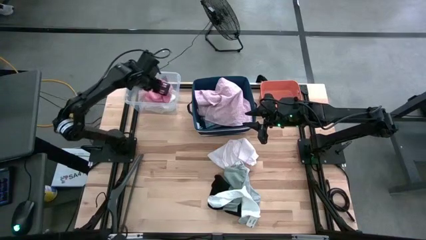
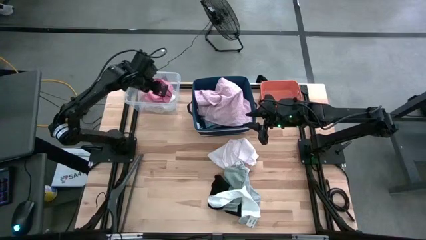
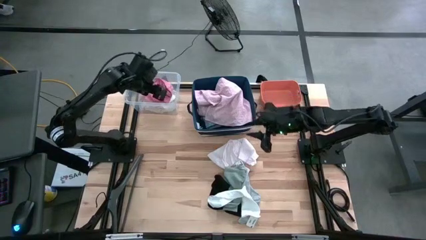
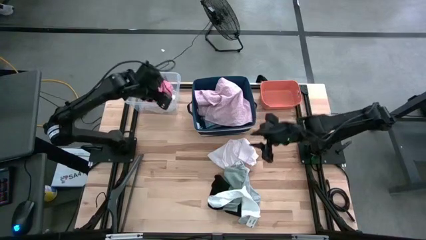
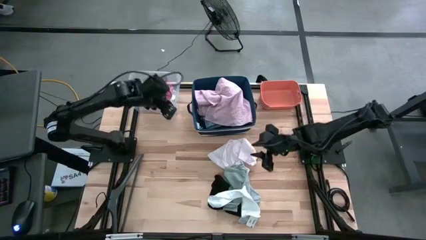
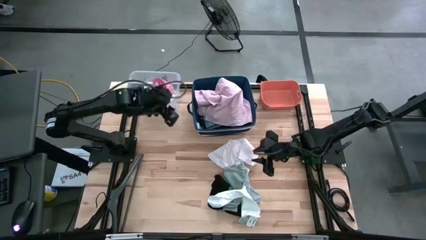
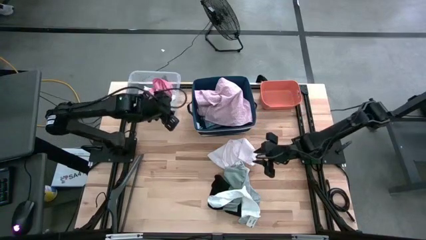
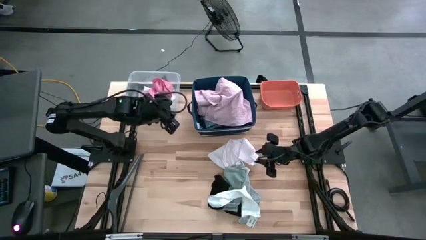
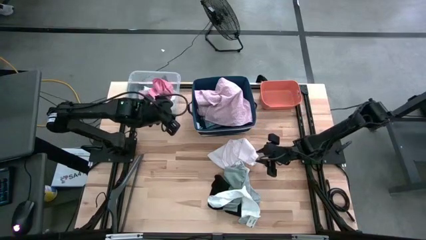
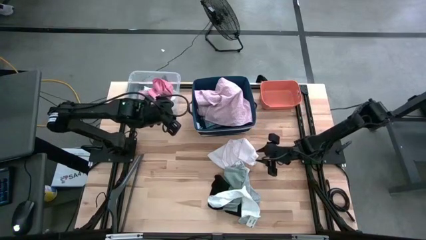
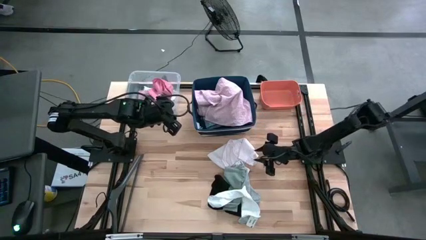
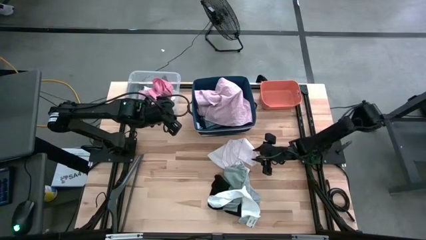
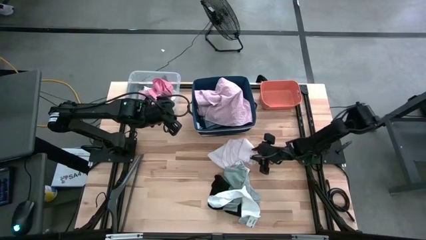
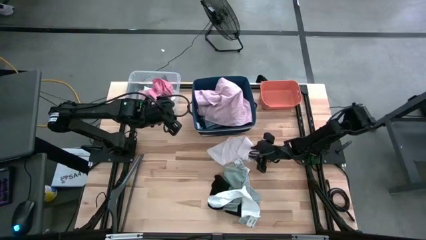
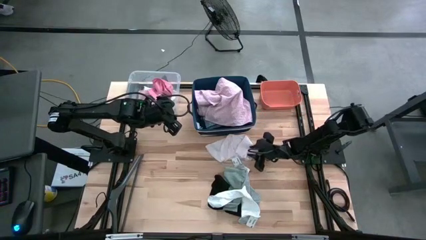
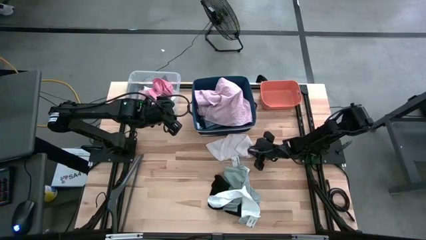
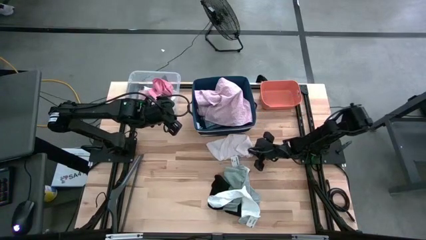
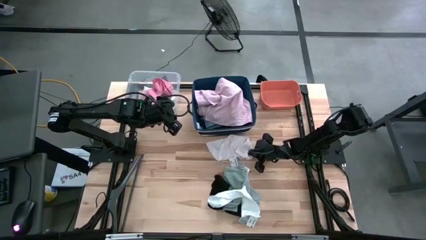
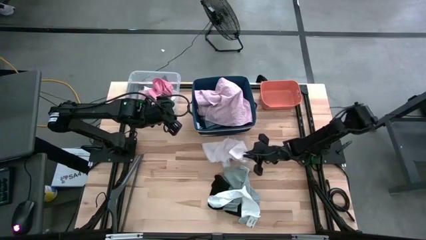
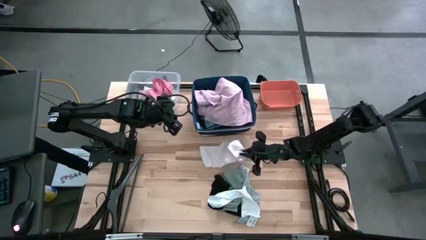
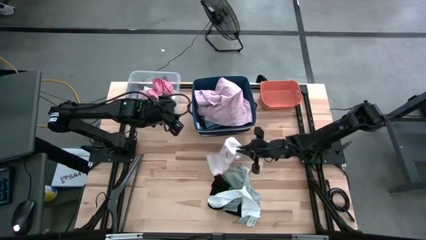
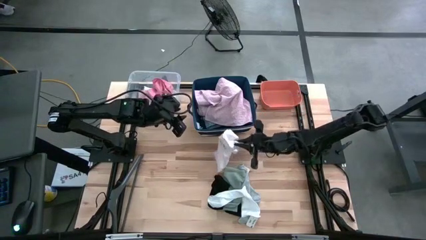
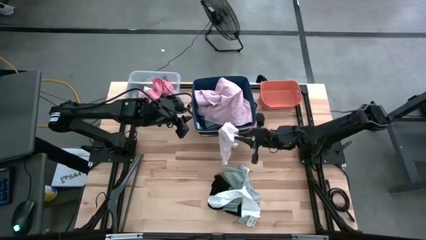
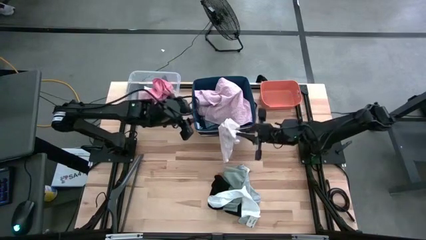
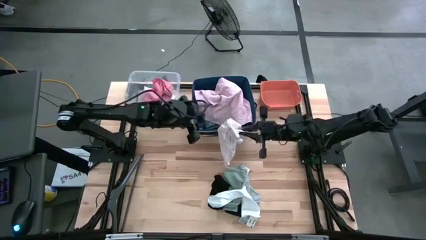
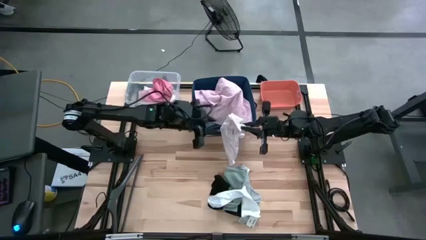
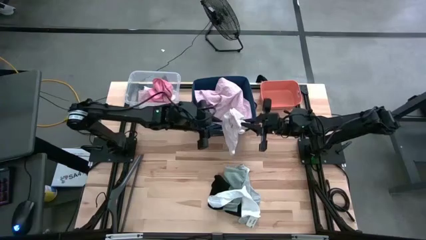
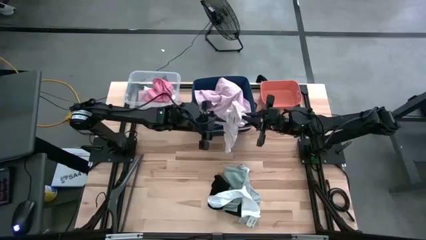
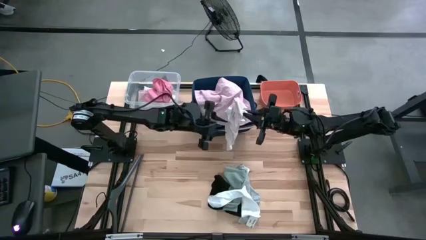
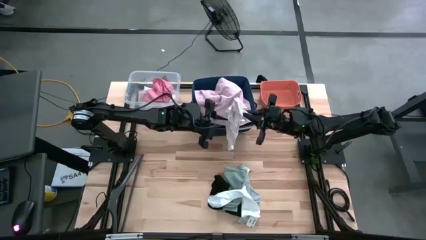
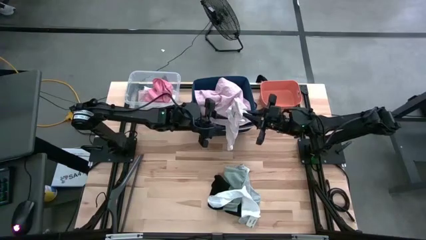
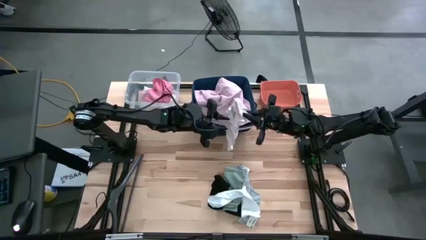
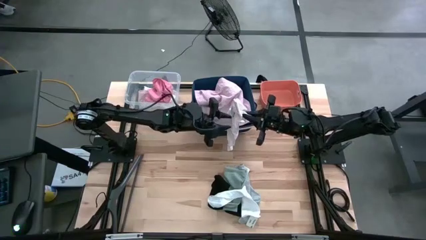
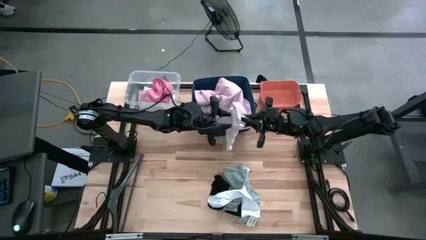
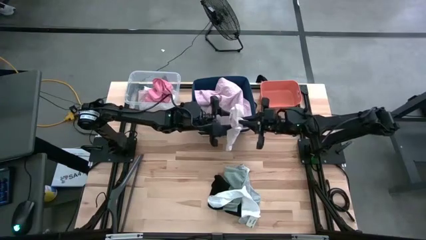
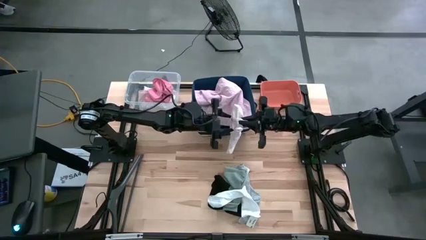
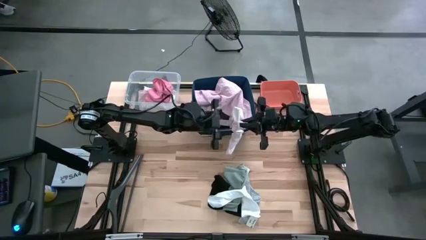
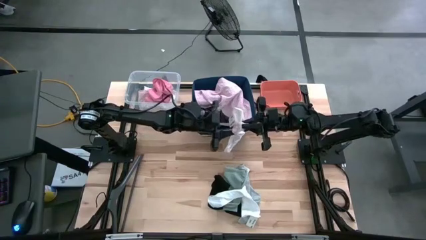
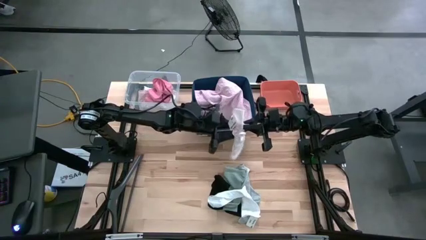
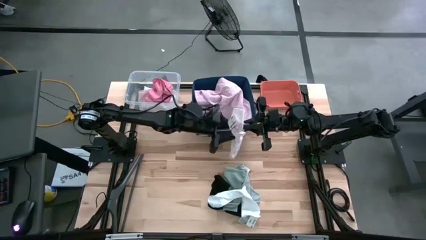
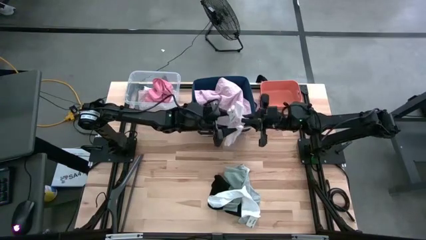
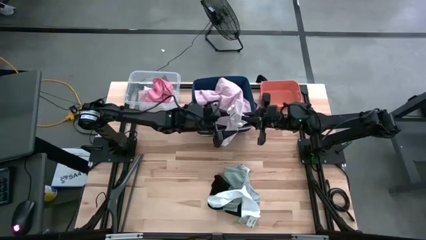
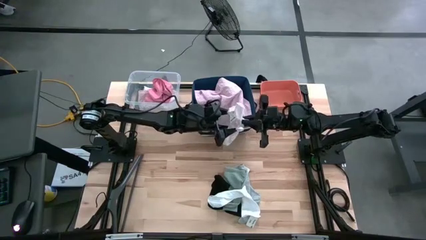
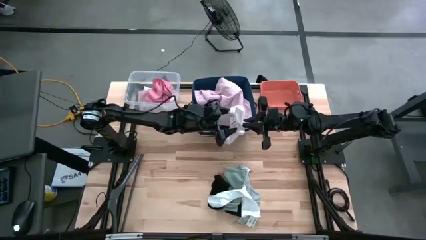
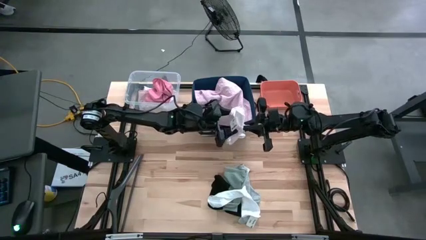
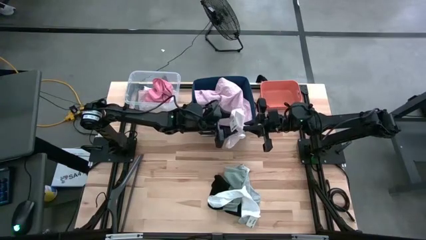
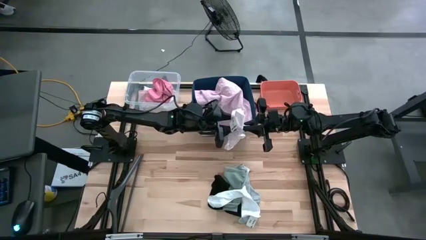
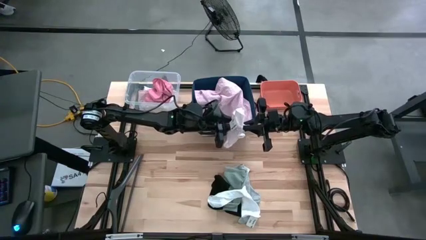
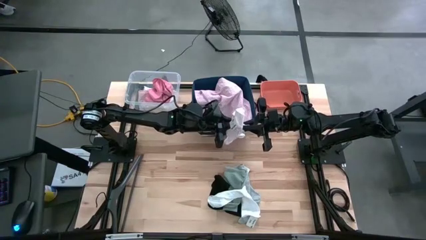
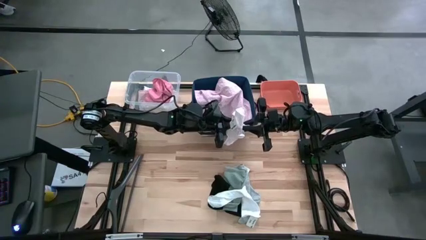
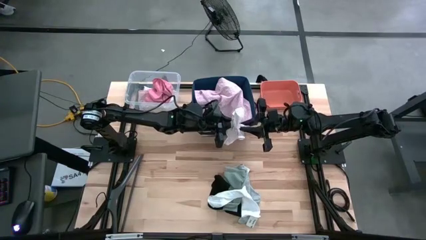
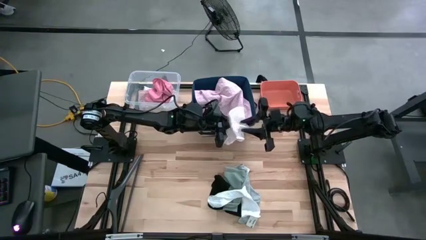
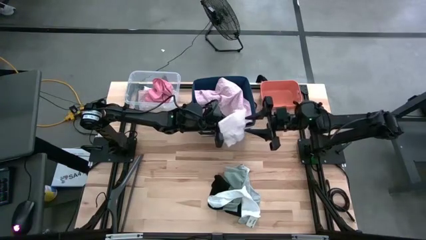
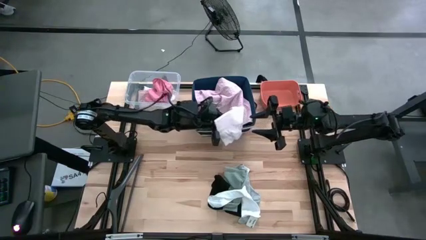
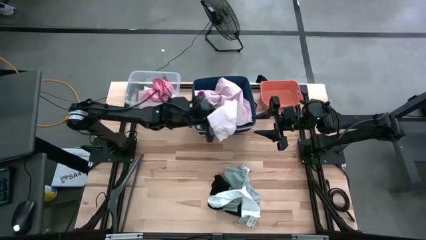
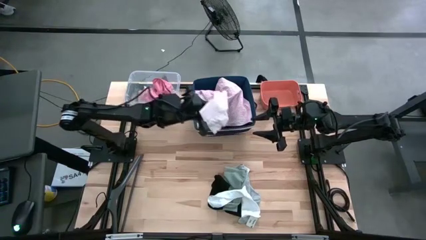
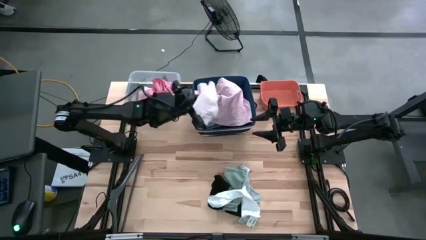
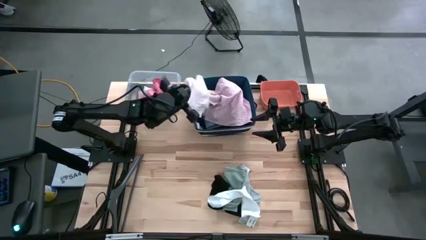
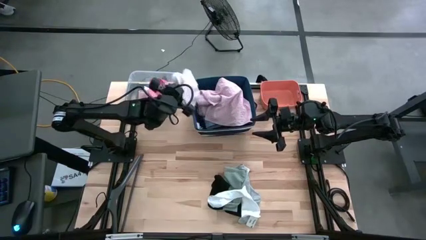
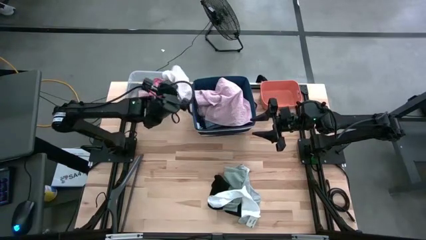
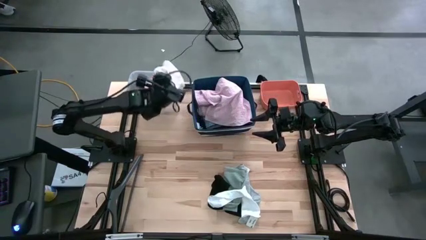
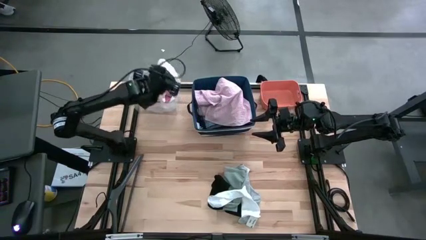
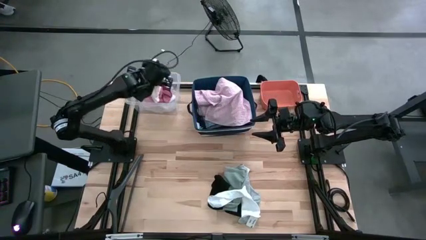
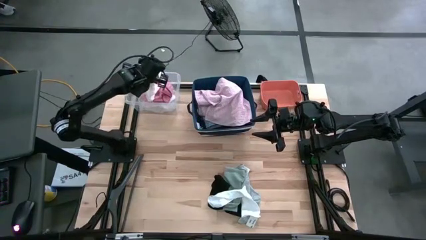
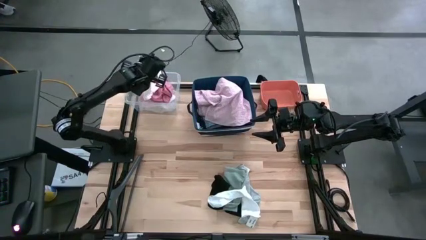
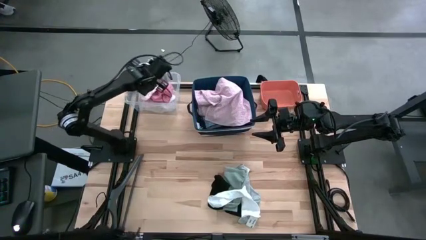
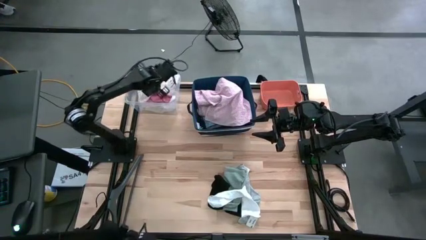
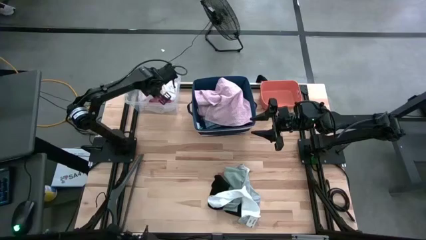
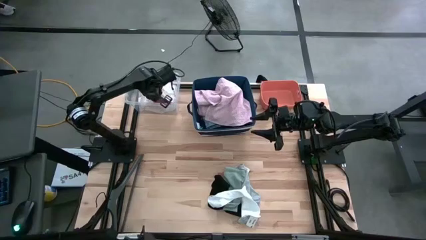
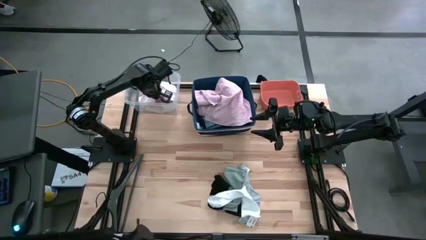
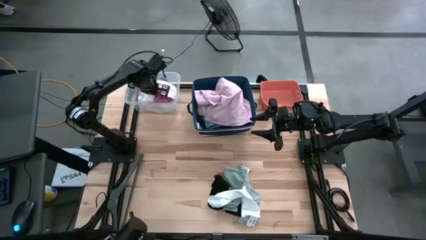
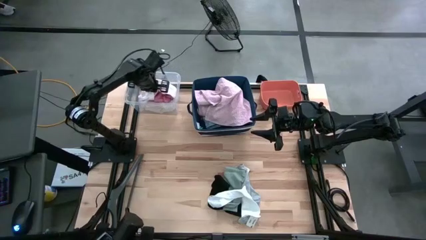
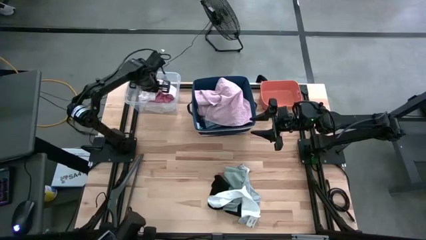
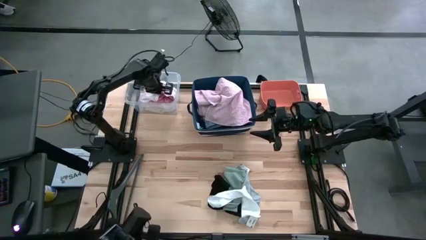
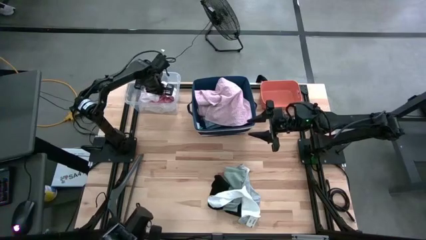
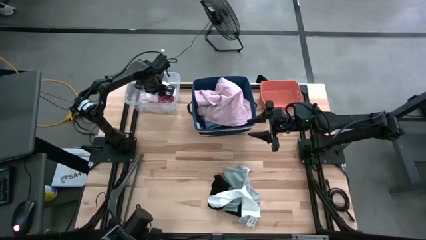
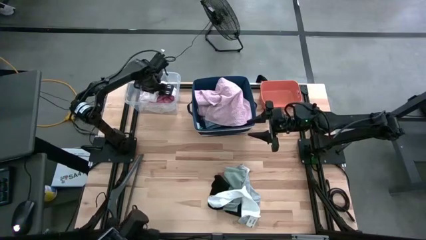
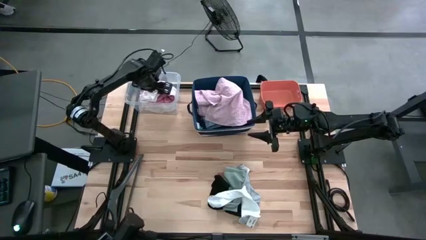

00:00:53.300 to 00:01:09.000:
Task: Pick & Place Cloths
Put the white underwear into the transparent bin
